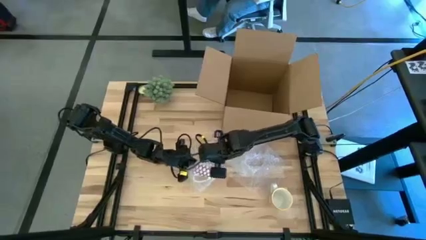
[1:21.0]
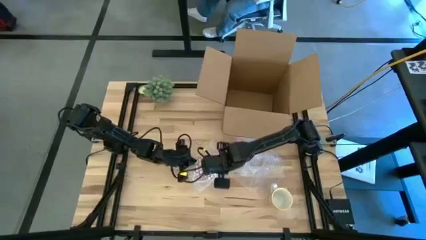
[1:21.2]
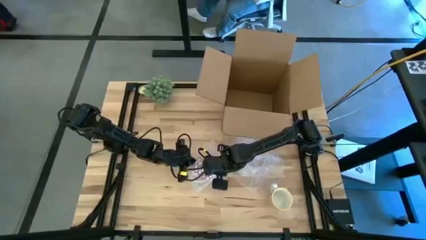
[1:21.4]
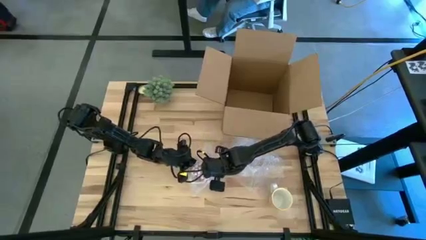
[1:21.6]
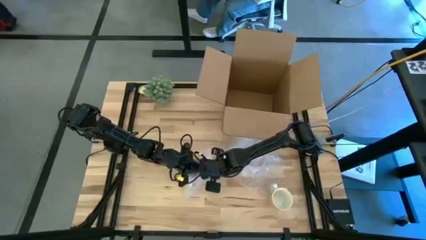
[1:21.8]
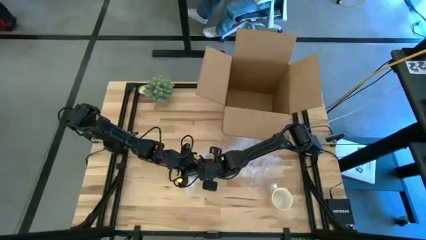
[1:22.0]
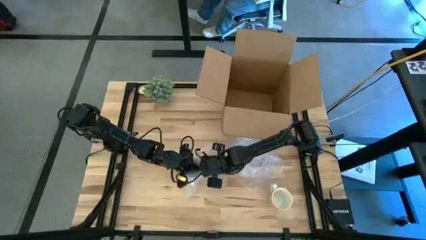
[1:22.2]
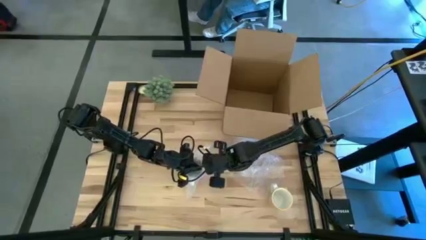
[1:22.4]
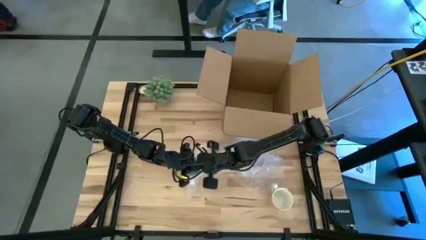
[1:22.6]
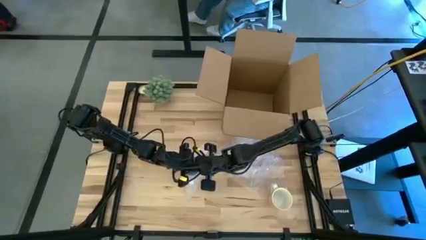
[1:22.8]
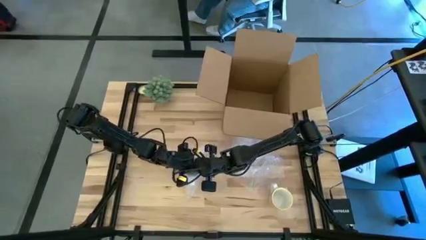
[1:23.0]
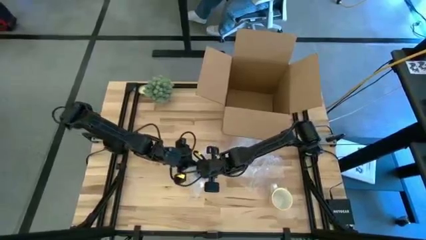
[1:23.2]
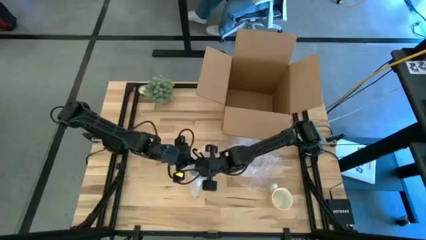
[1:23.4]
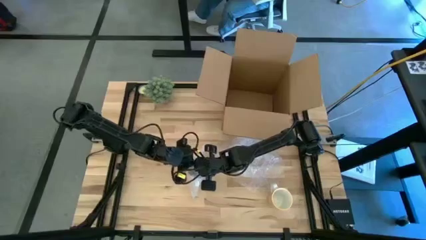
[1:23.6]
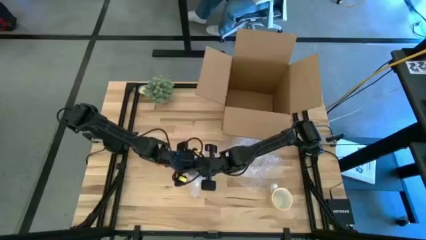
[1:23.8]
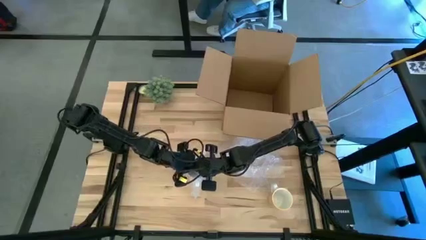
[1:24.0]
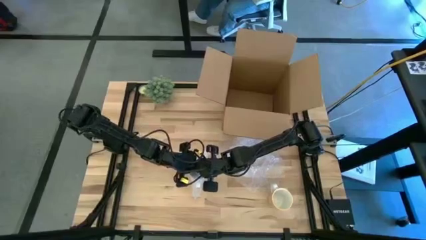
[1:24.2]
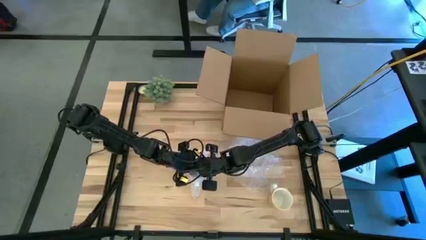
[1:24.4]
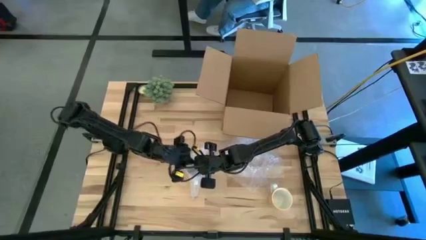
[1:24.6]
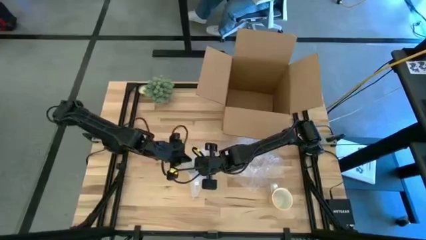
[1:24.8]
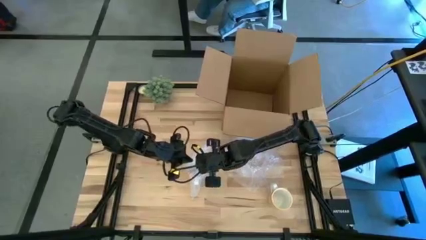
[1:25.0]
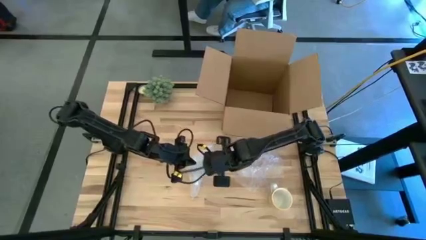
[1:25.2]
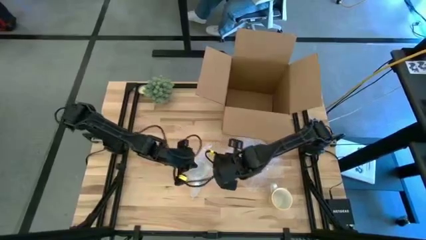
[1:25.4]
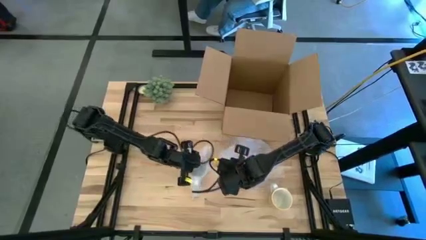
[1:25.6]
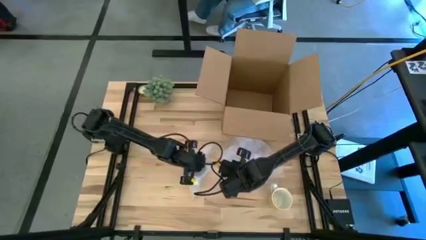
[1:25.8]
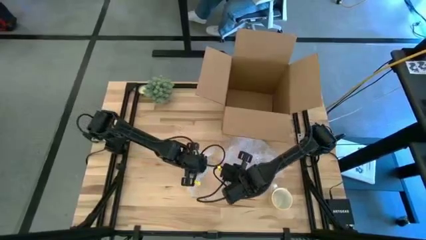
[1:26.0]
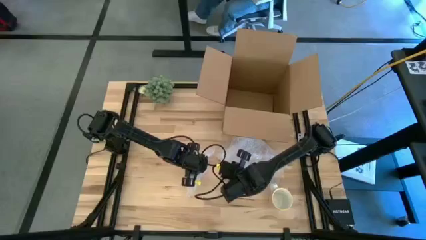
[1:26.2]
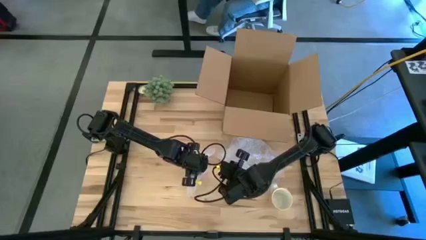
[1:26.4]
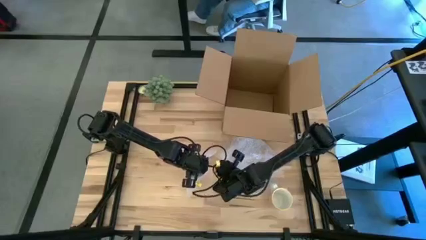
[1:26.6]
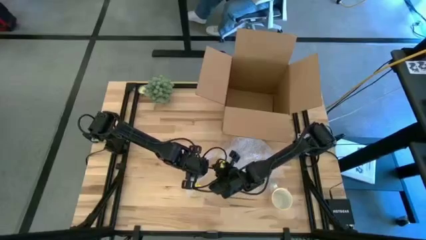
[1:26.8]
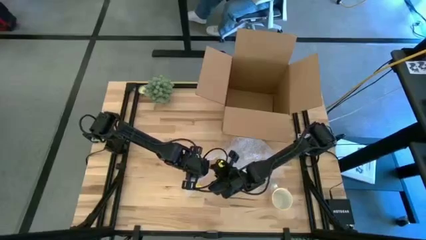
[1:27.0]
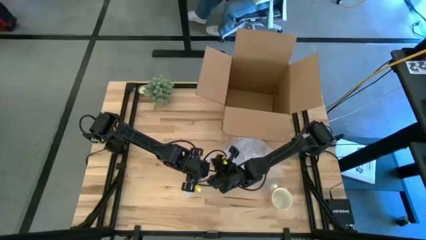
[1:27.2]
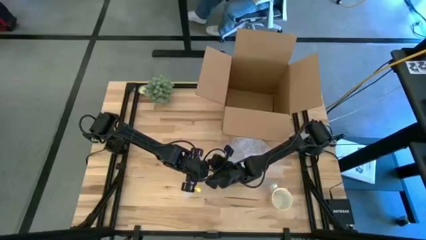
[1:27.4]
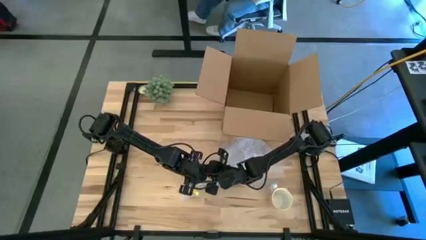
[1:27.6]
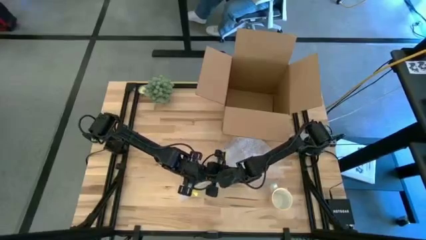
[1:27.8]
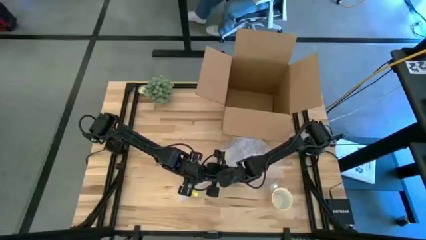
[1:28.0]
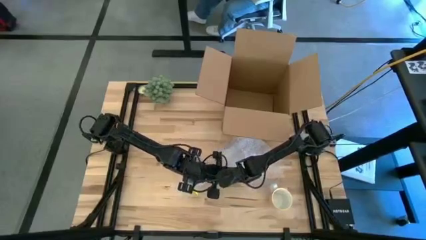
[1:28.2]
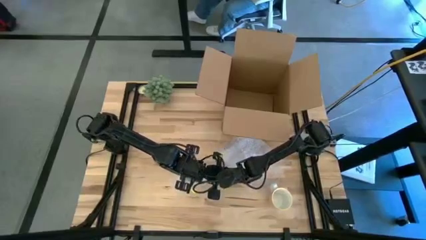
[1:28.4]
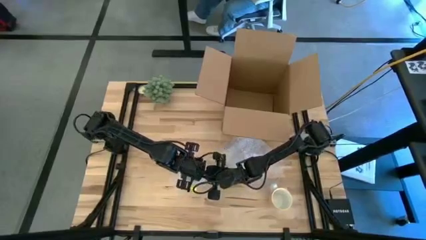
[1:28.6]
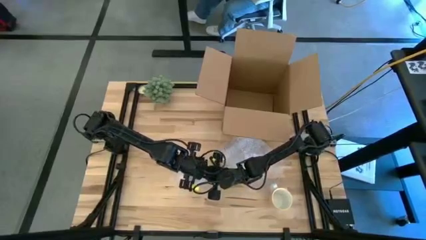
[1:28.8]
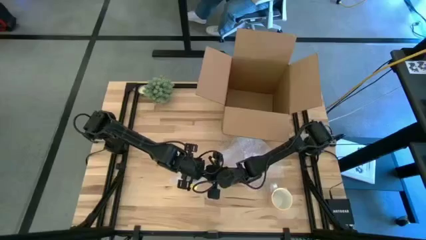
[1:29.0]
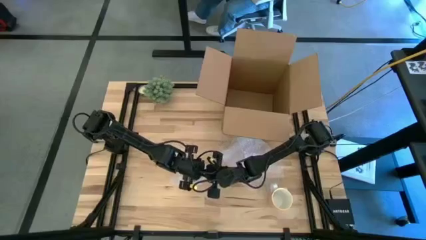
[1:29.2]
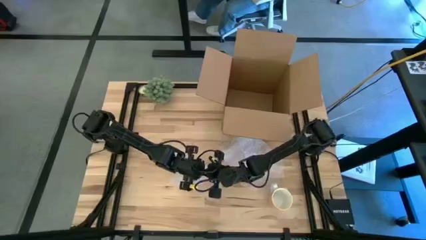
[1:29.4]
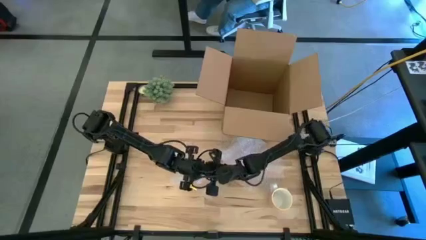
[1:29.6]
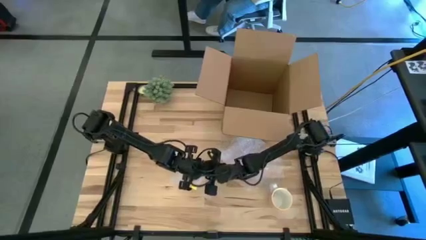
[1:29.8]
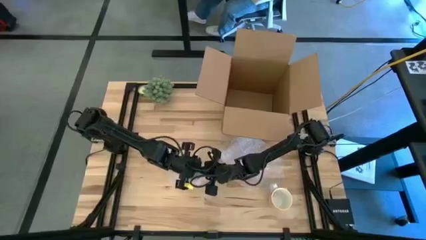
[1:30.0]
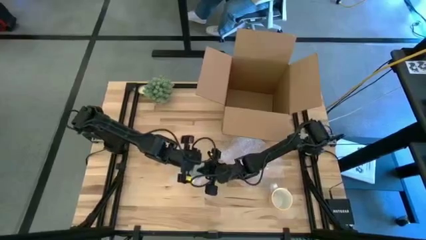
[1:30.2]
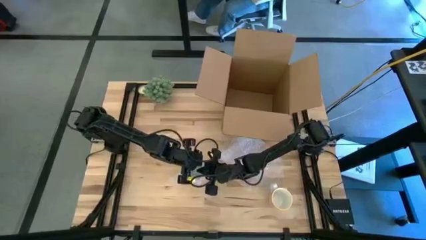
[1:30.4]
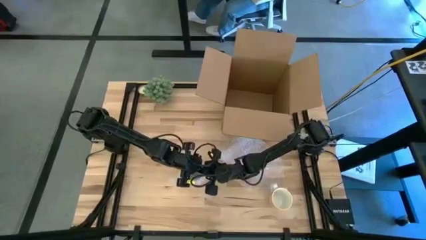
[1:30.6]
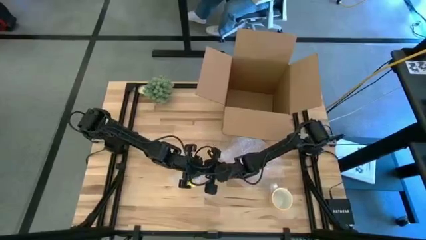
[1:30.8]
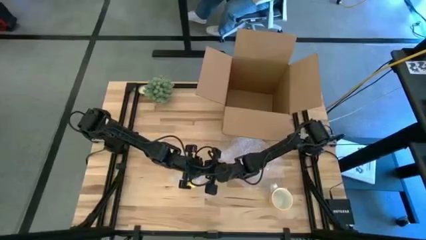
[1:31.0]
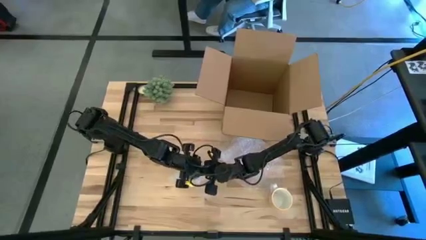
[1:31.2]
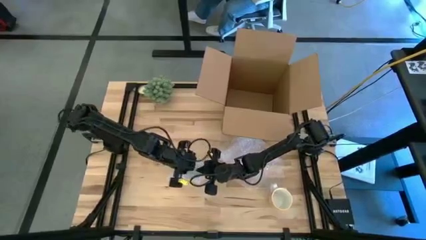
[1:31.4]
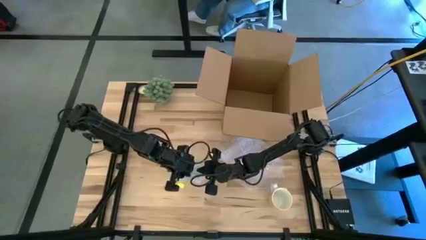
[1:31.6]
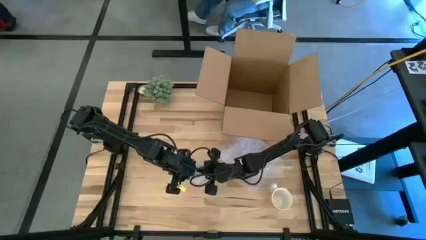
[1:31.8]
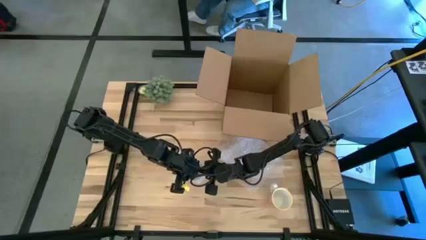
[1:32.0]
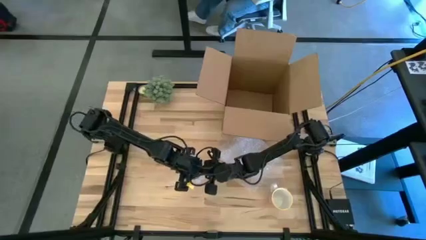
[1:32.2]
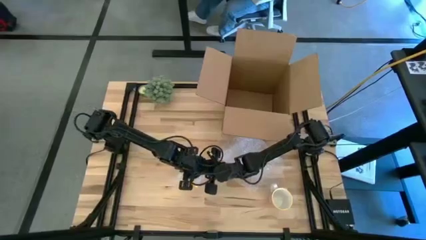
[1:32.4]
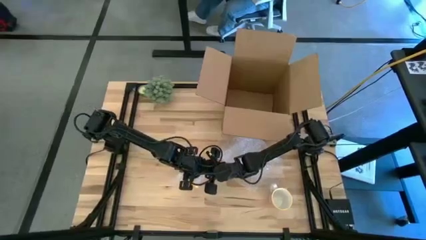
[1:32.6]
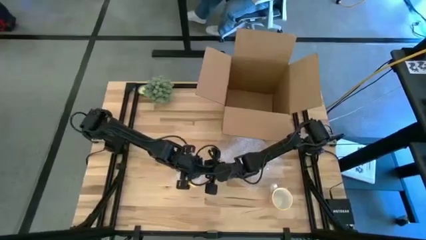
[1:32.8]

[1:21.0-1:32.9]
Task: wrap mug
Wrap the red patterned mug with the bubble wrap

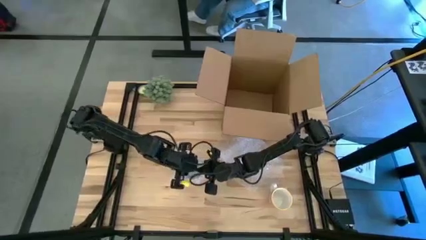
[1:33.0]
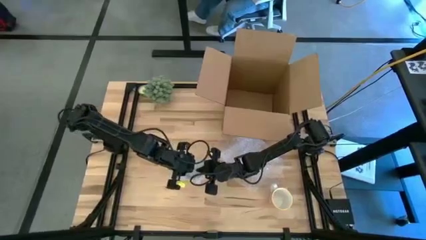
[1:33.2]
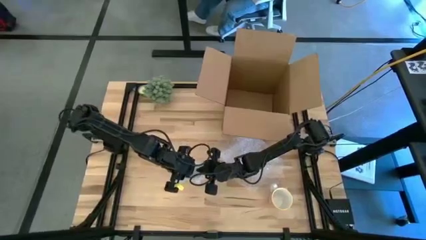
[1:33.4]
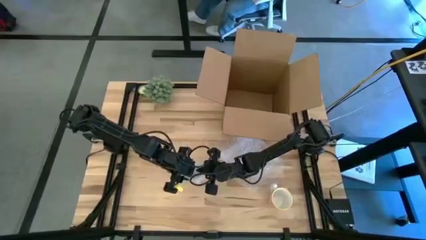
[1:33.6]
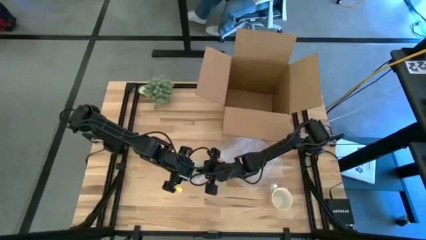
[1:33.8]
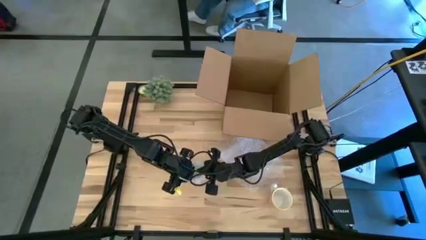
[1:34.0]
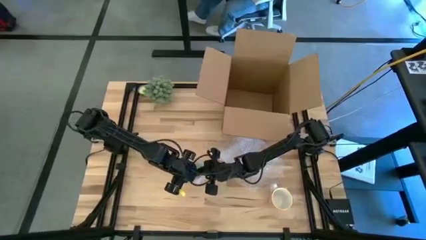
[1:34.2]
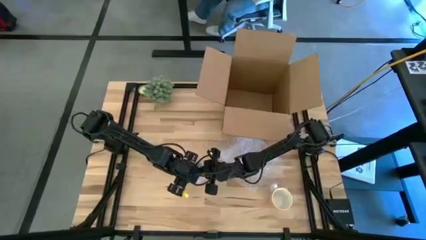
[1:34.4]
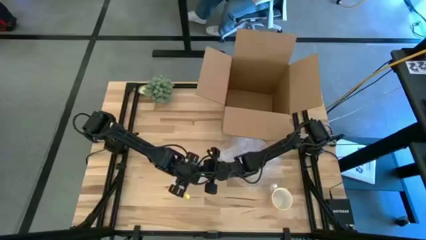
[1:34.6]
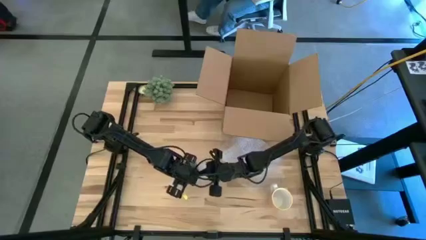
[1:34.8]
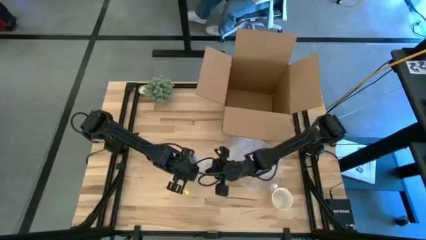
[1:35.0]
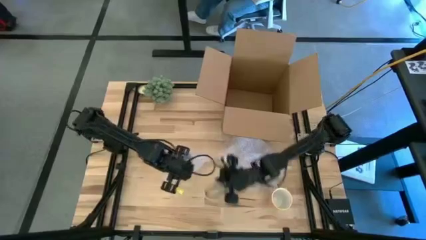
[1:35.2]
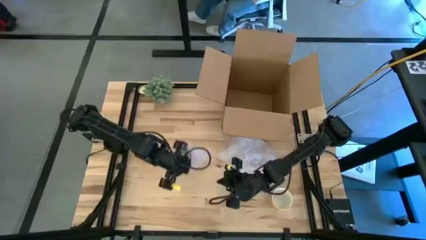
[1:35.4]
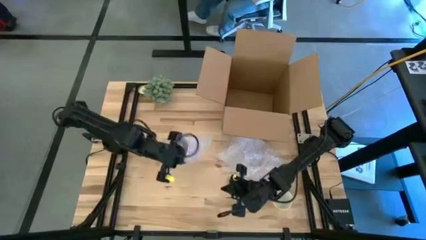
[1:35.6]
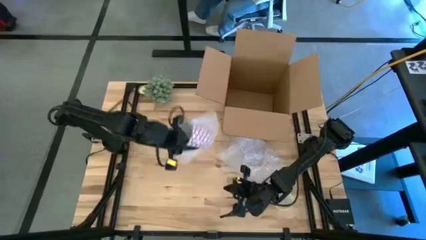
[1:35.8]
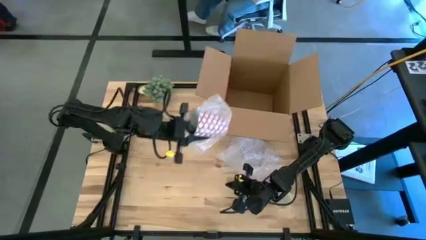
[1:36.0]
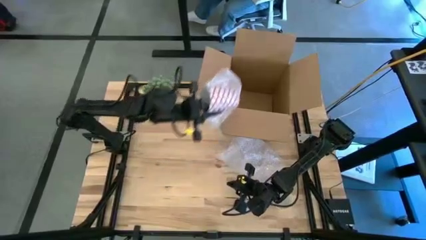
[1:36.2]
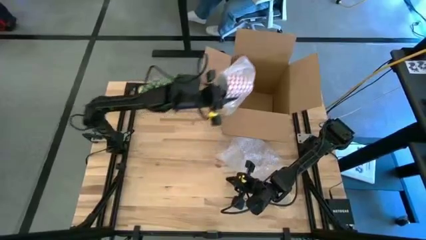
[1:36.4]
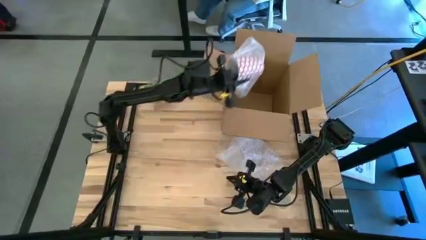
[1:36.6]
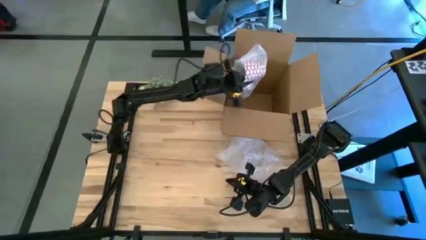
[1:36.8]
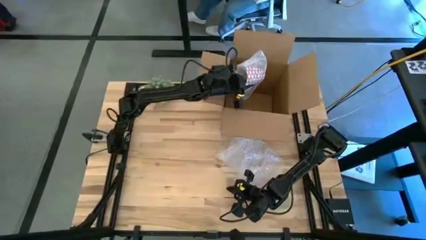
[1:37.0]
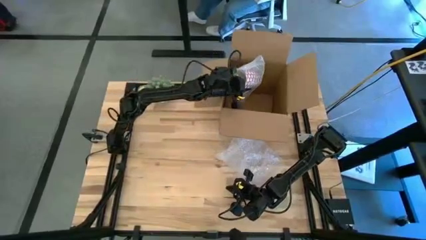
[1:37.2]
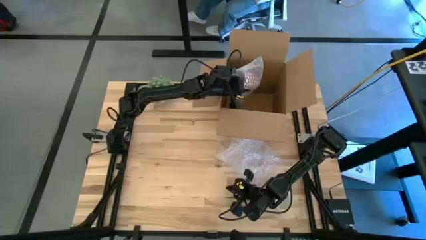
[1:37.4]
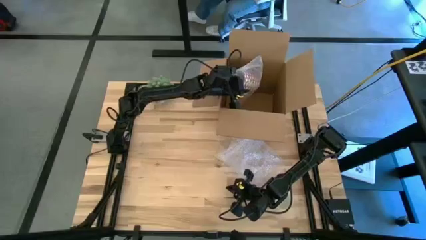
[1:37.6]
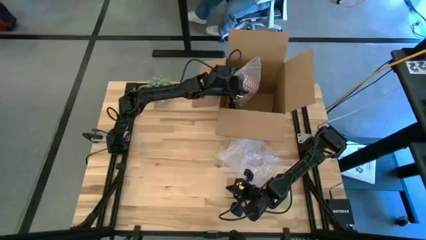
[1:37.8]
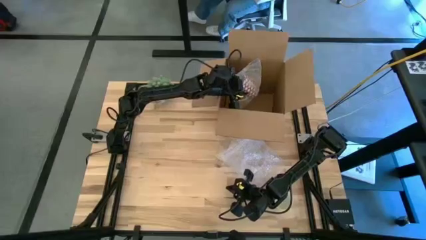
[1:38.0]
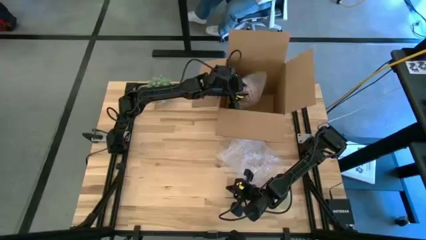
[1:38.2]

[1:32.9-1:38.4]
Put the wrapped red patterned mug into the cardboard box

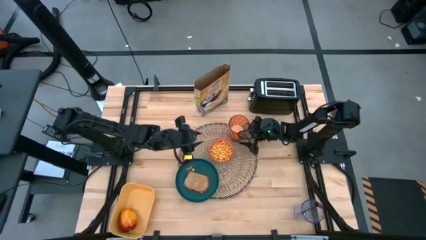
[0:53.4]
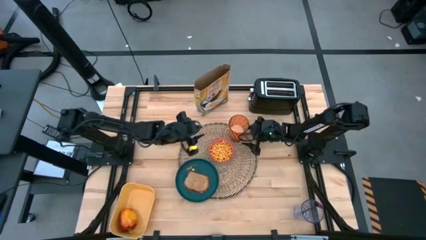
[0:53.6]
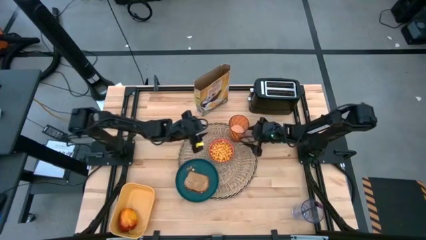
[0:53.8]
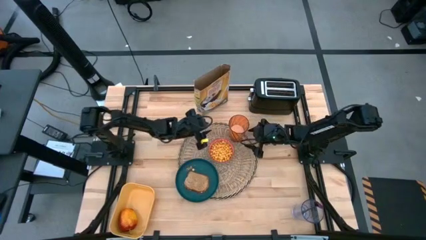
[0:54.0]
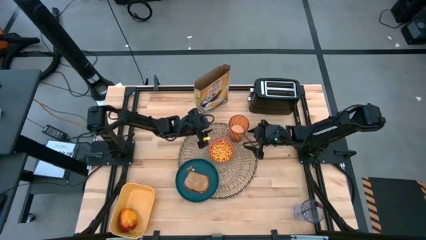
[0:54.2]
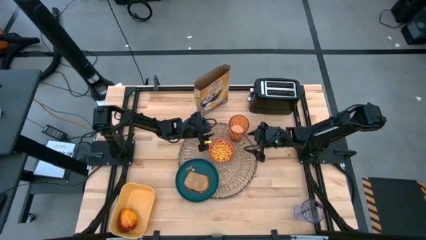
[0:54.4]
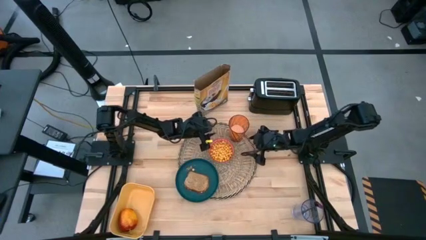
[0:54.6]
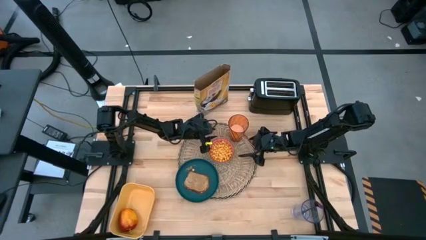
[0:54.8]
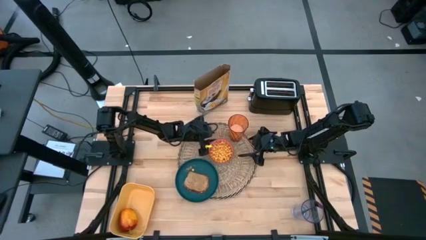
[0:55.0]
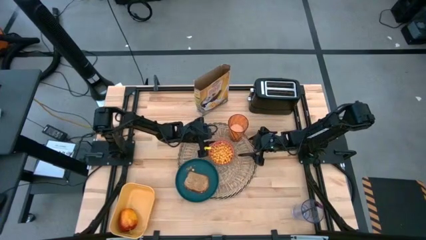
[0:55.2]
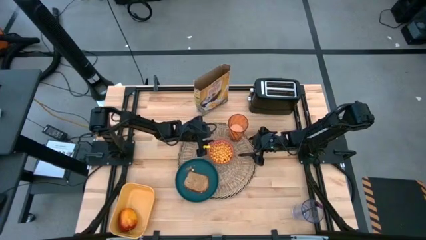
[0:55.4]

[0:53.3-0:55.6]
Task: Arrange a breakfast setting
Adjust the red patterned bowl
